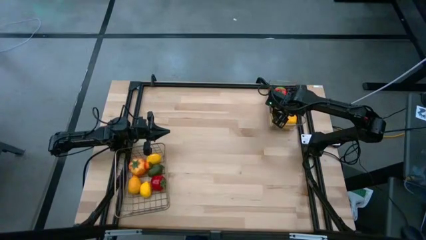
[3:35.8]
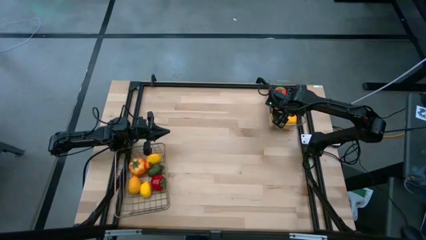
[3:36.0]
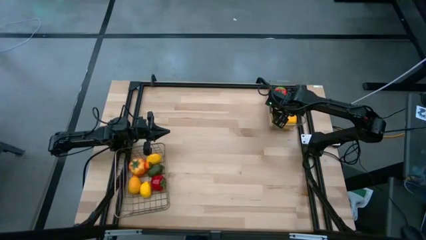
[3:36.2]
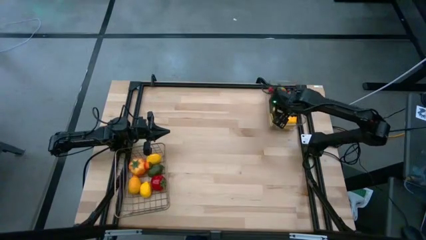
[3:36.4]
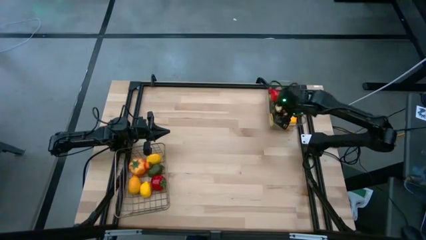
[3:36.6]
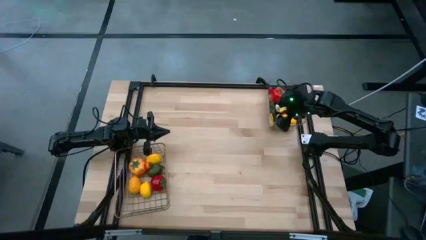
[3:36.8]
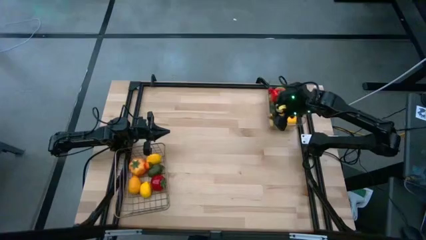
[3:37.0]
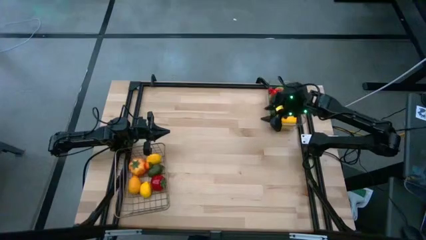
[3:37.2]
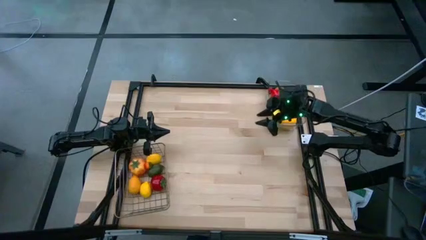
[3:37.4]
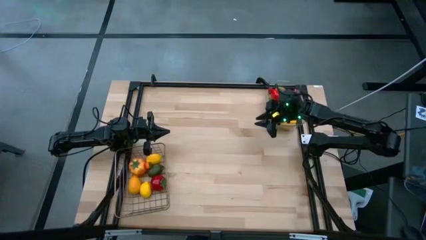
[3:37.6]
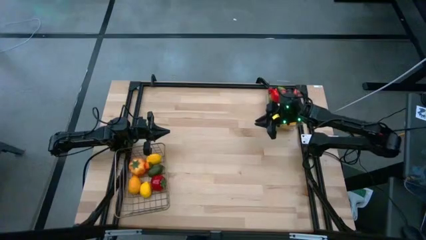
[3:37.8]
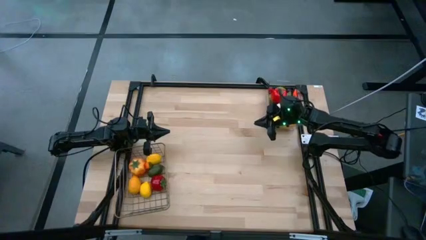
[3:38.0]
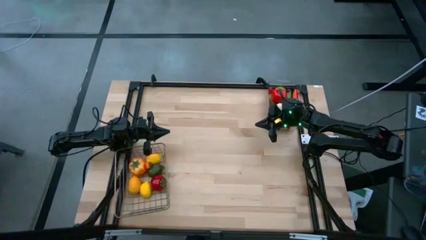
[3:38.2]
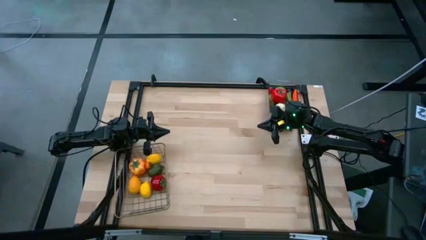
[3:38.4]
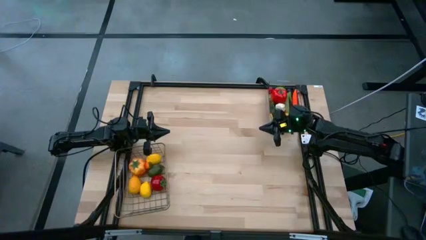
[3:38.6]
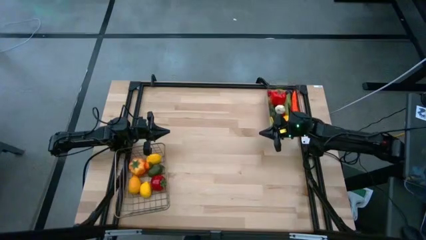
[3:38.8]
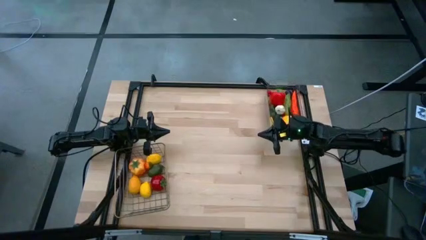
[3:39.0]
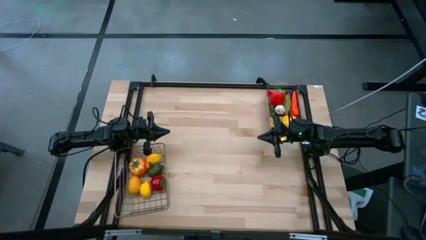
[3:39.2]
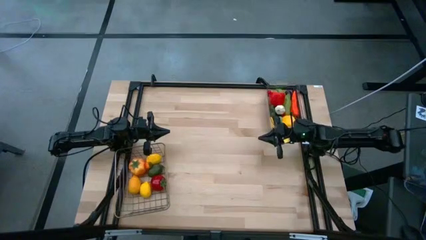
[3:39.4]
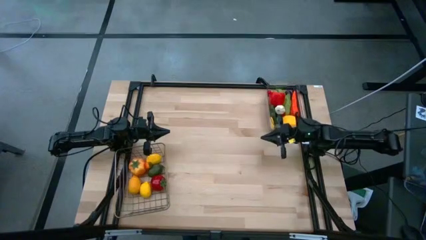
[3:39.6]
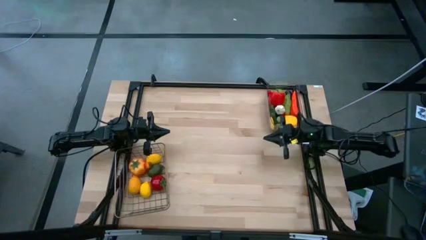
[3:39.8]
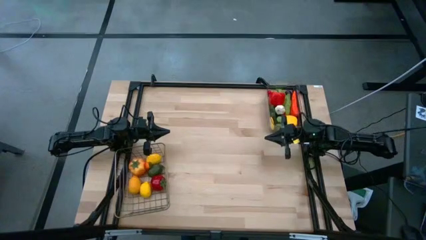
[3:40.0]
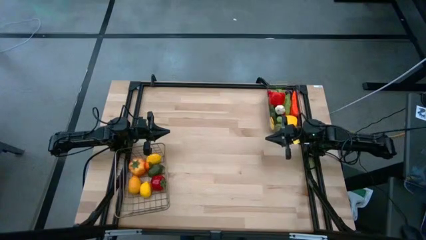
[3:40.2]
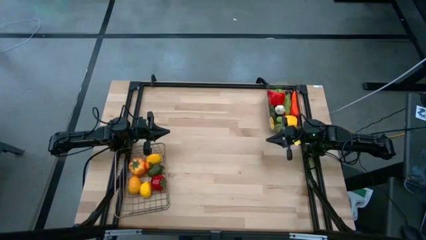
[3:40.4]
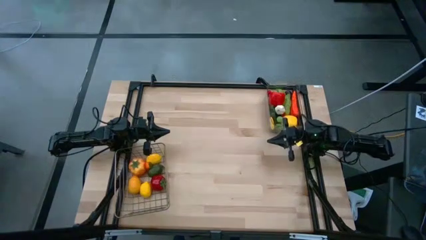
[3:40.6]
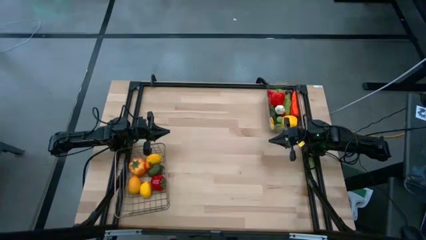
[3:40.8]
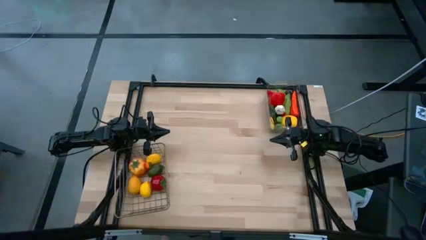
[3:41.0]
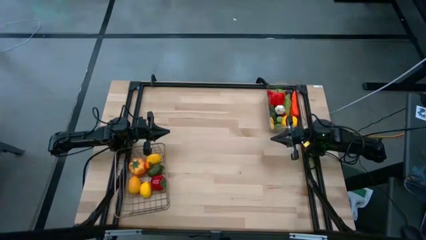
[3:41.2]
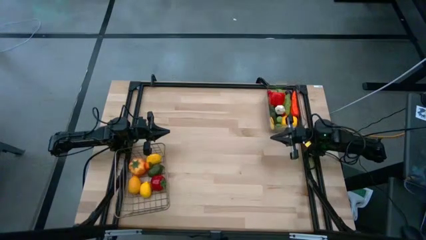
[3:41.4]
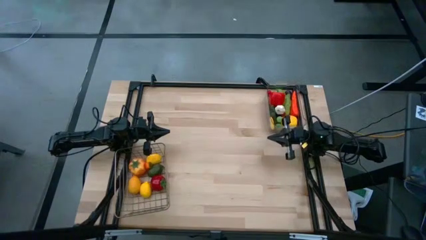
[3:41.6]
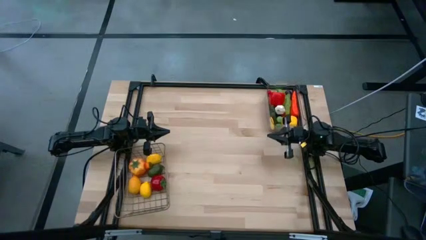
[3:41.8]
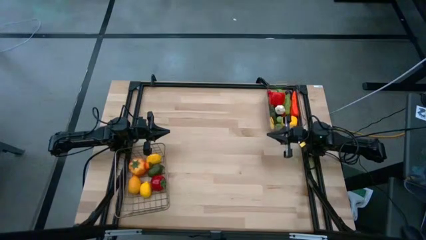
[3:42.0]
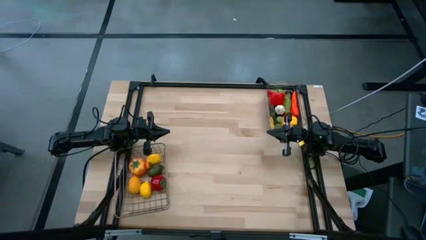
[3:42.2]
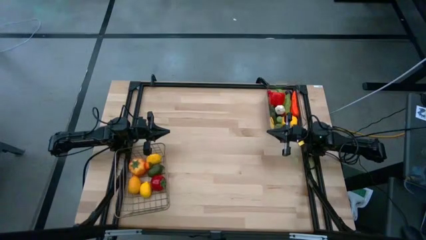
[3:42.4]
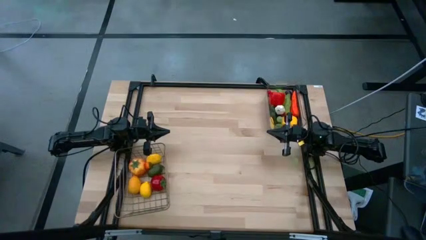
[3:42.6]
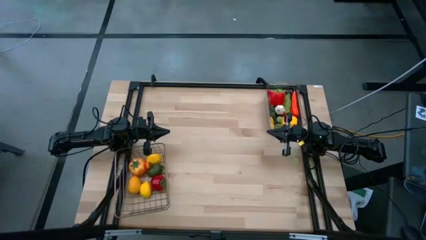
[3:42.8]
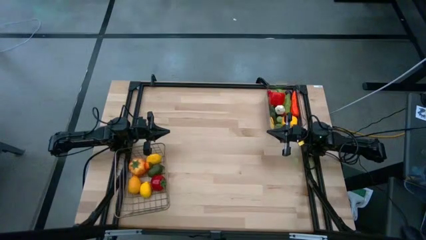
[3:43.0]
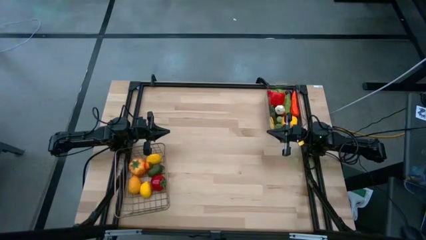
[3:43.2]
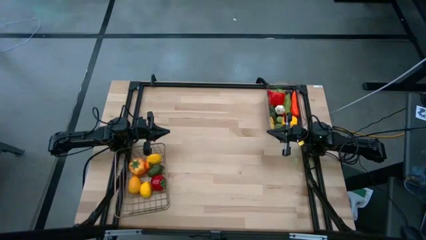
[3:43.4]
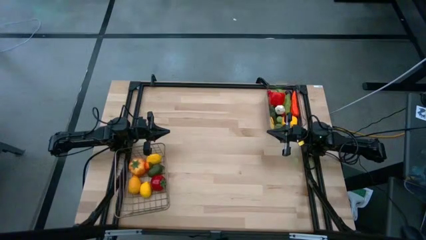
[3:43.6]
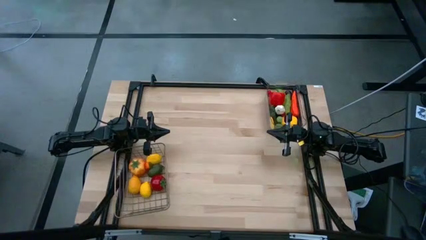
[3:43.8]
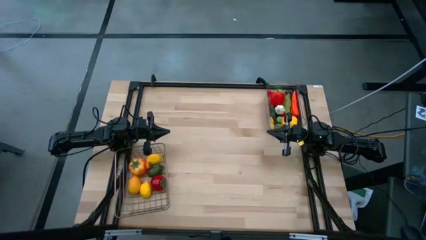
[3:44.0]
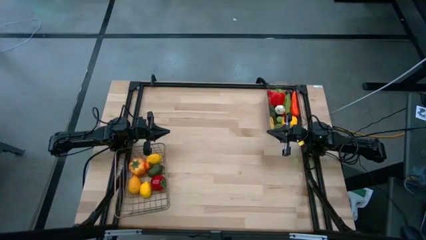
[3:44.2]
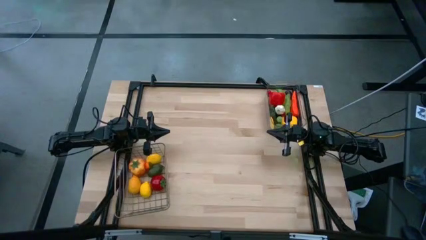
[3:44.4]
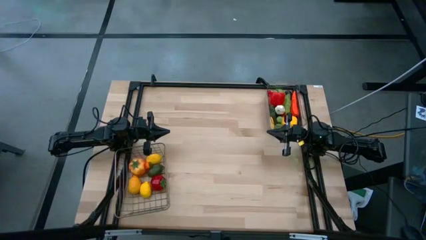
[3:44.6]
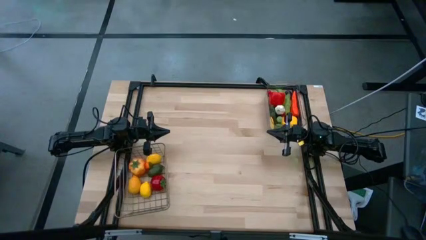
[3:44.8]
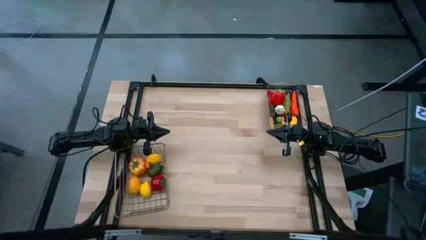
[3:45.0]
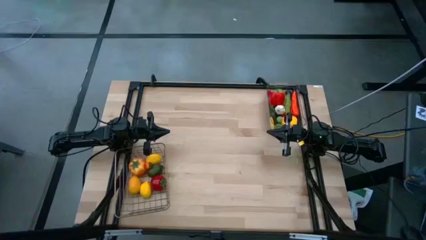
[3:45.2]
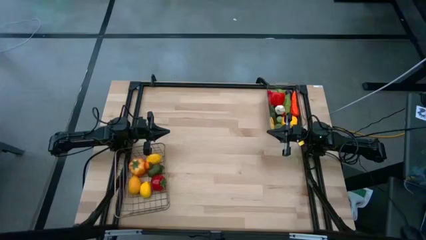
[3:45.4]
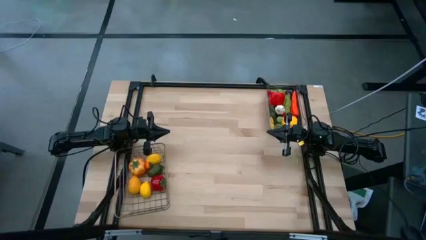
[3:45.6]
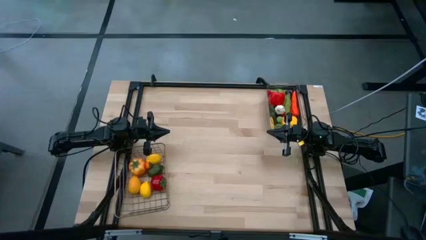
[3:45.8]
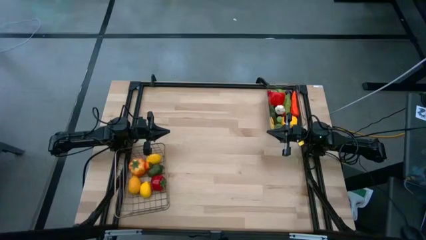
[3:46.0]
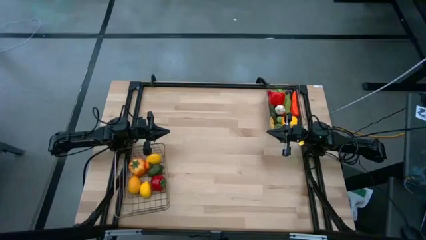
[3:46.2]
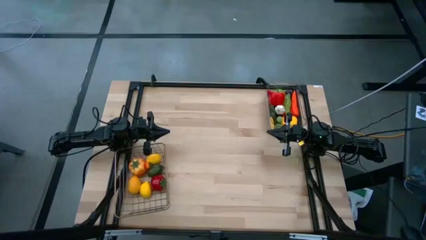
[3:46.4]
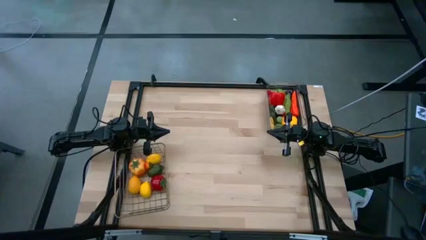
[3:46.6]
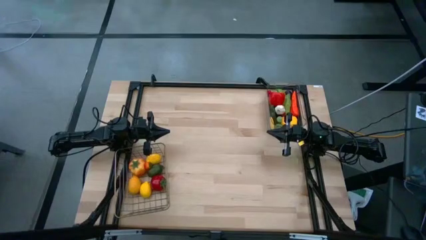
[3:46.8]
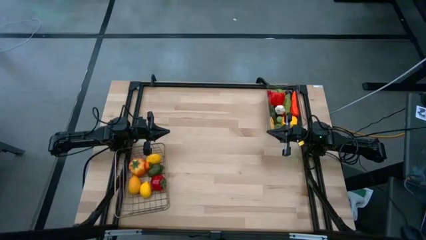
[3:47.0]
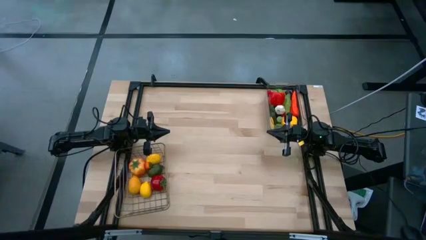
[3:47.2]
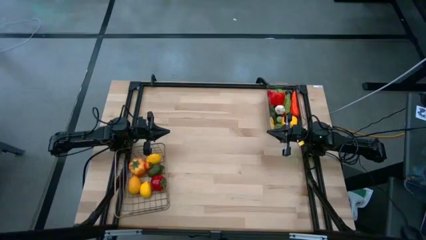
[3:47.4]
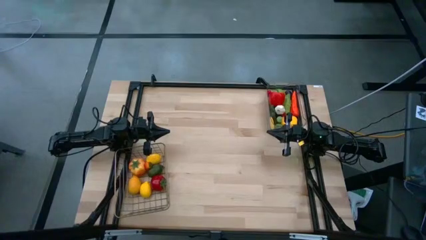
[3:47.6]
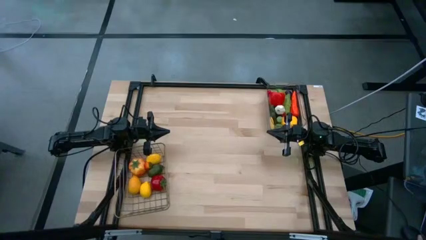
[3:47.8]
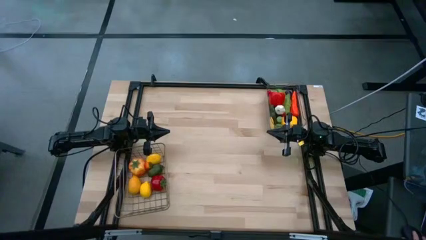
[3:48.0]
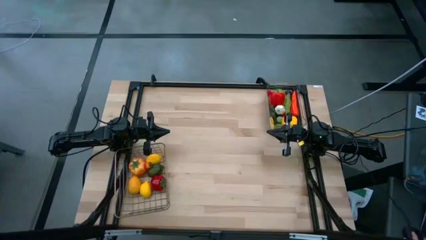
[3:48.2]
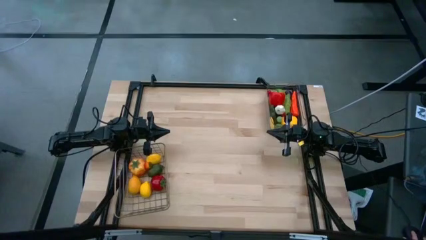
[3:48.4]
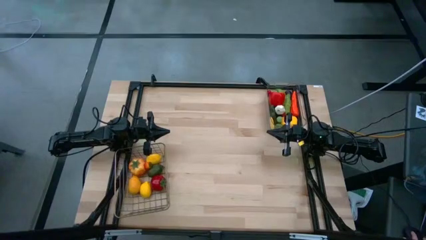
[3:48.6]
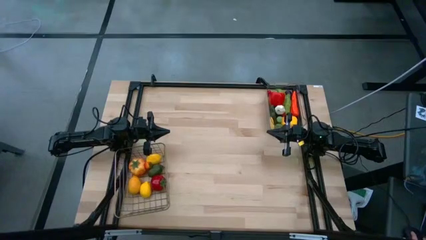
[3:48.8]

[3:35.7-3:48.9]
Task: Sort produce into baskets
Return to Home Position
